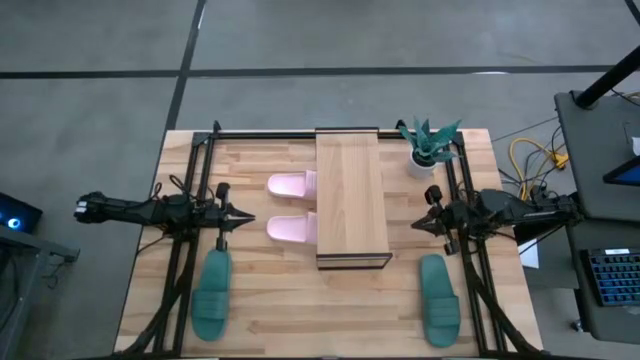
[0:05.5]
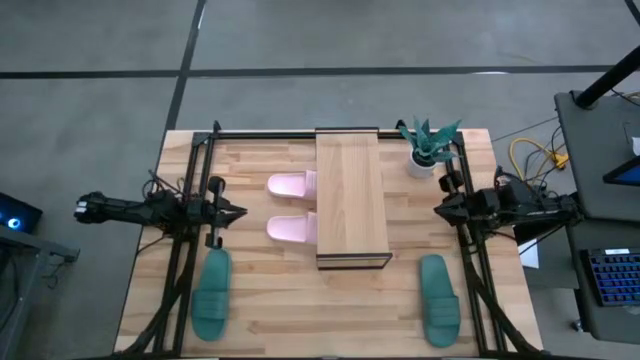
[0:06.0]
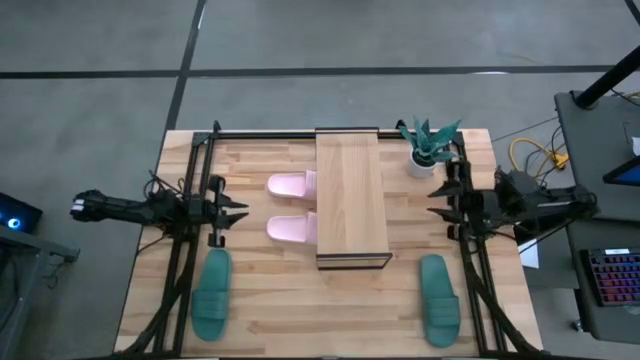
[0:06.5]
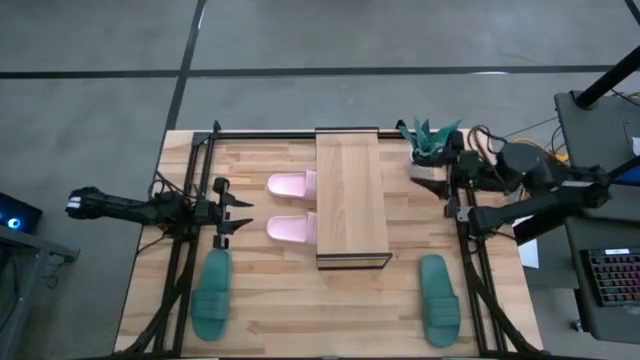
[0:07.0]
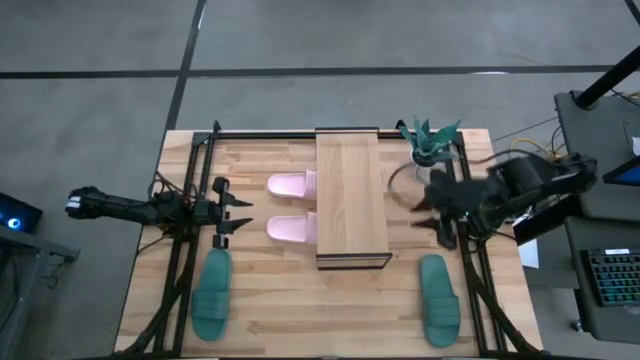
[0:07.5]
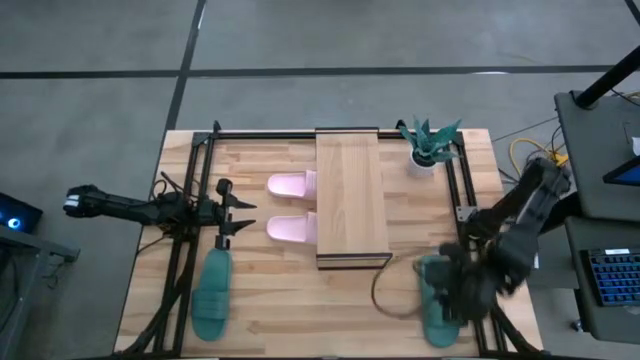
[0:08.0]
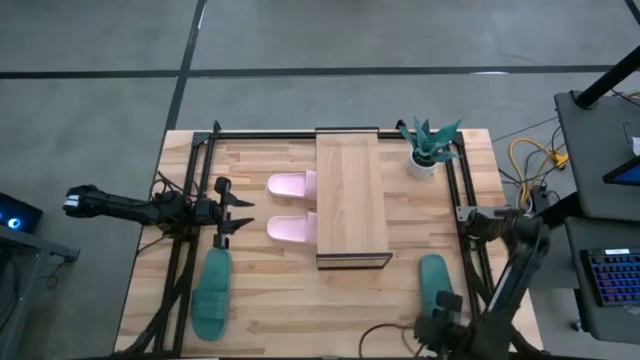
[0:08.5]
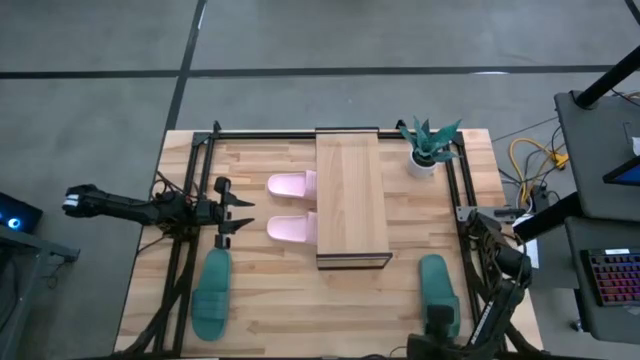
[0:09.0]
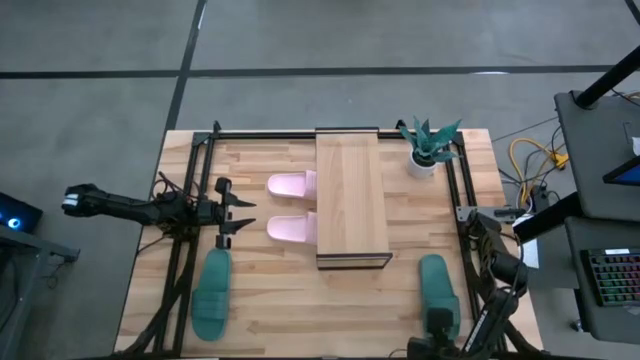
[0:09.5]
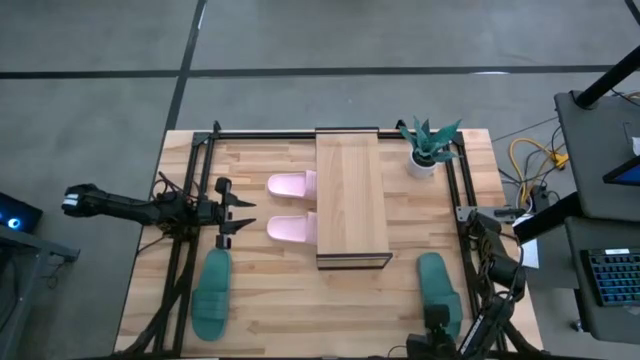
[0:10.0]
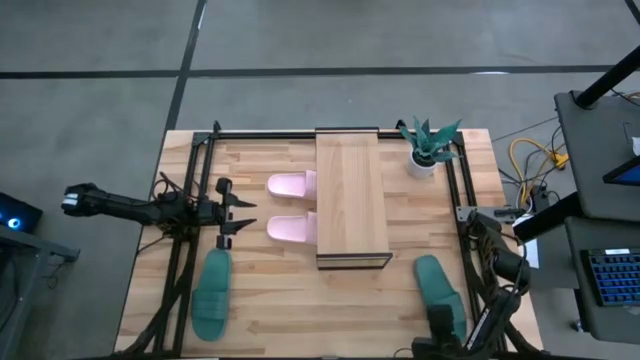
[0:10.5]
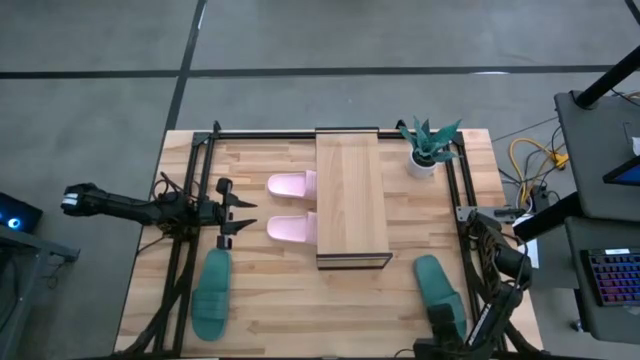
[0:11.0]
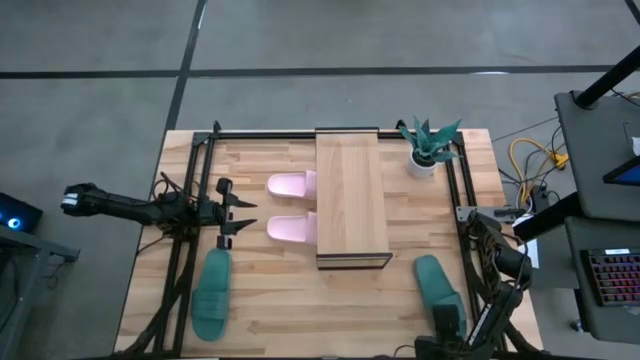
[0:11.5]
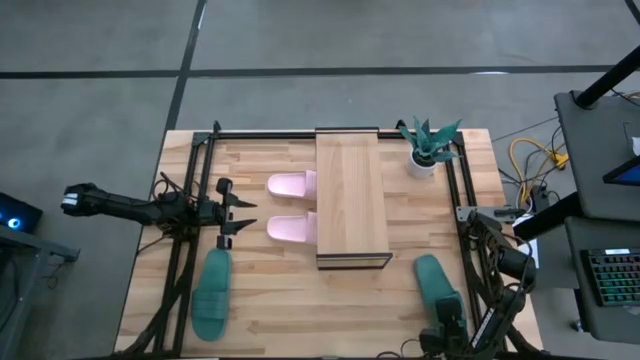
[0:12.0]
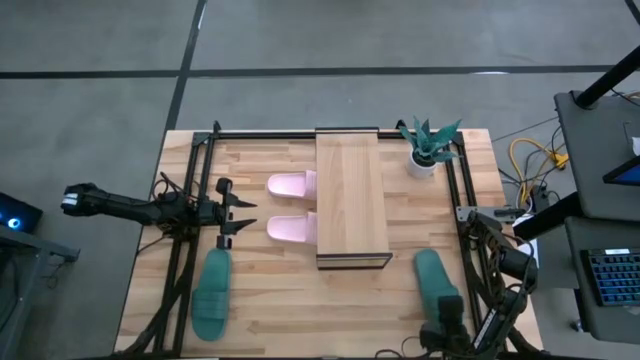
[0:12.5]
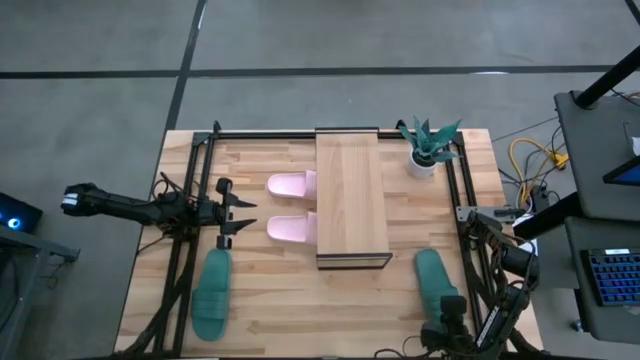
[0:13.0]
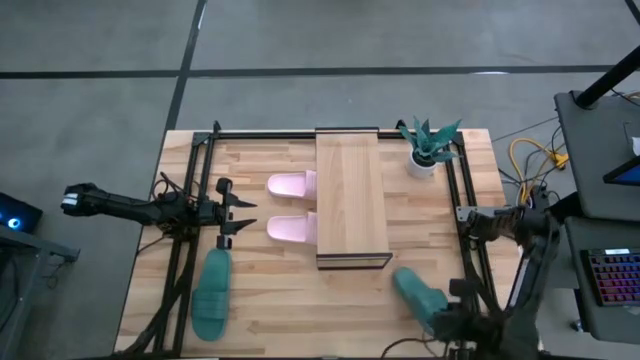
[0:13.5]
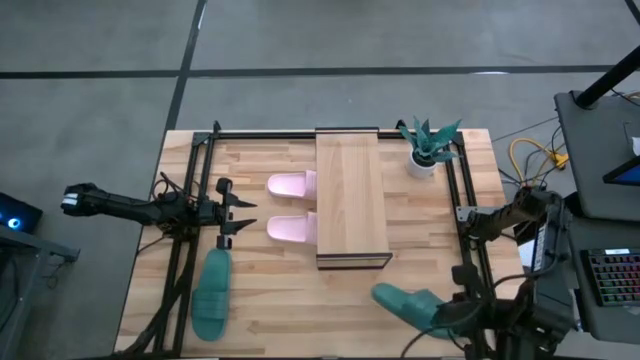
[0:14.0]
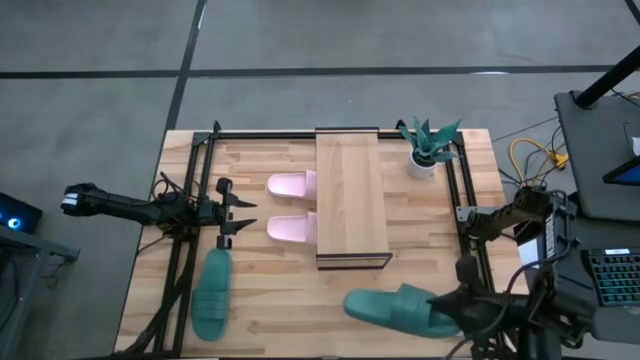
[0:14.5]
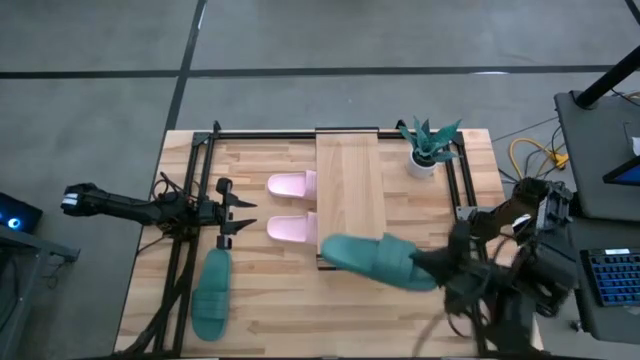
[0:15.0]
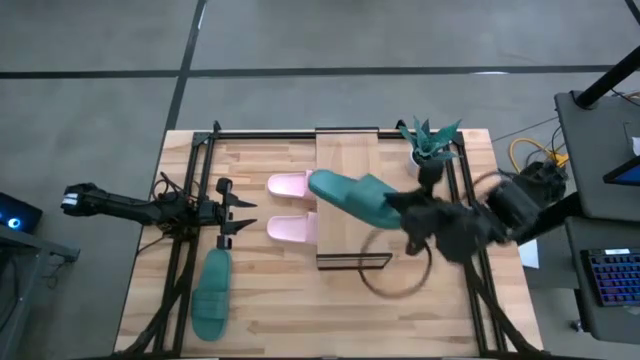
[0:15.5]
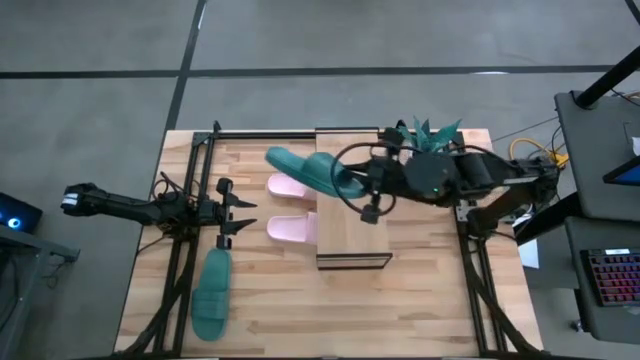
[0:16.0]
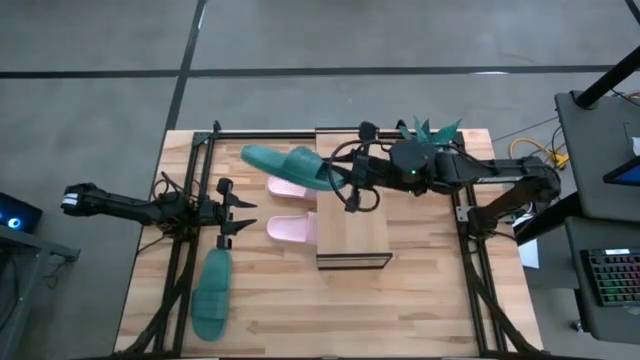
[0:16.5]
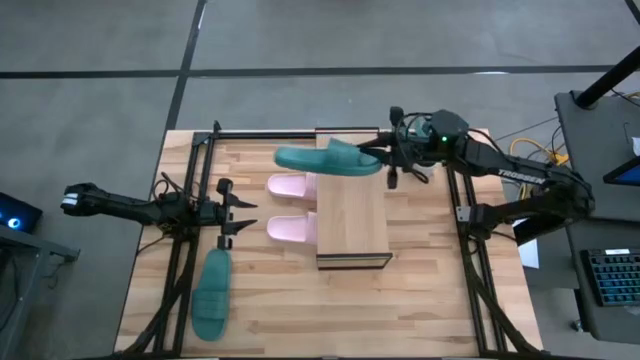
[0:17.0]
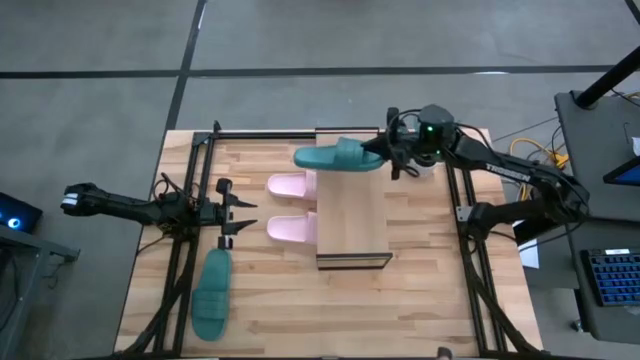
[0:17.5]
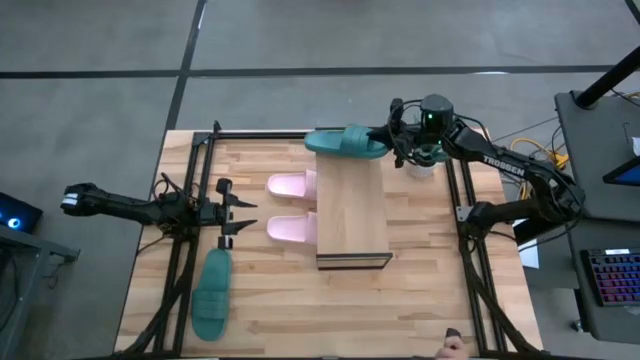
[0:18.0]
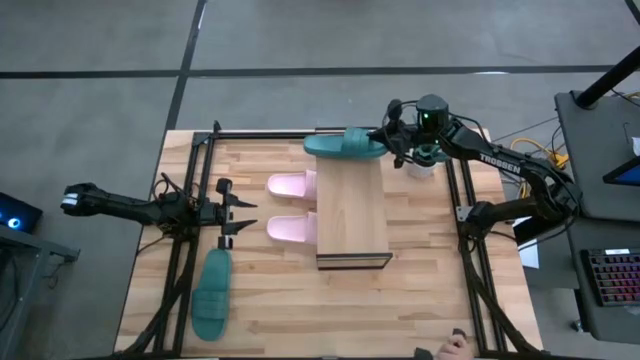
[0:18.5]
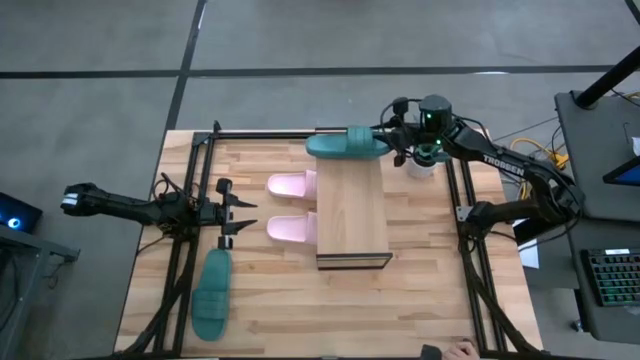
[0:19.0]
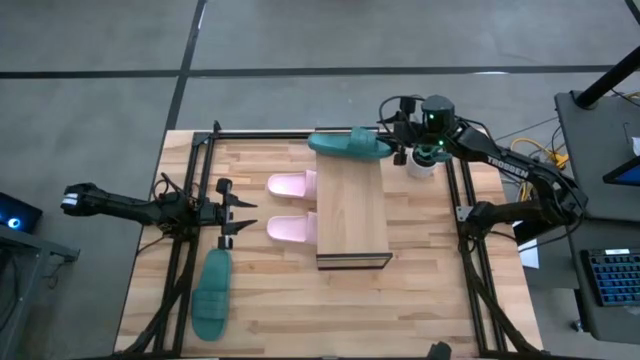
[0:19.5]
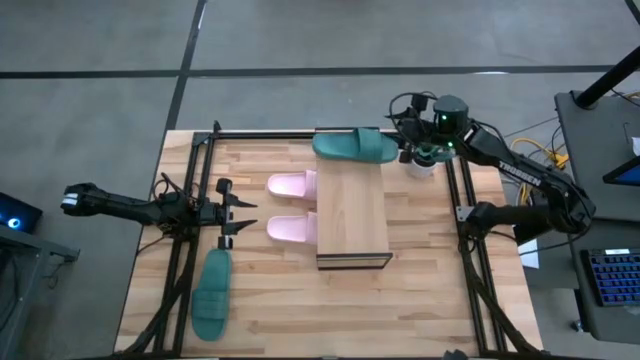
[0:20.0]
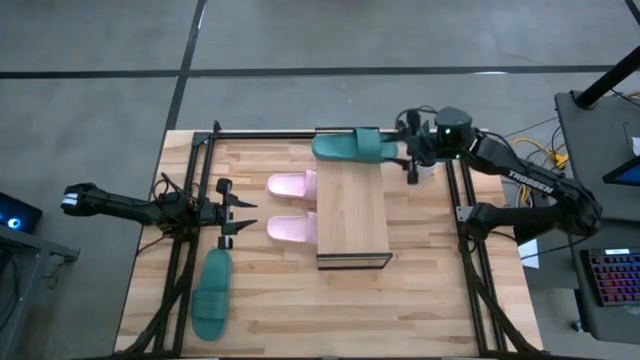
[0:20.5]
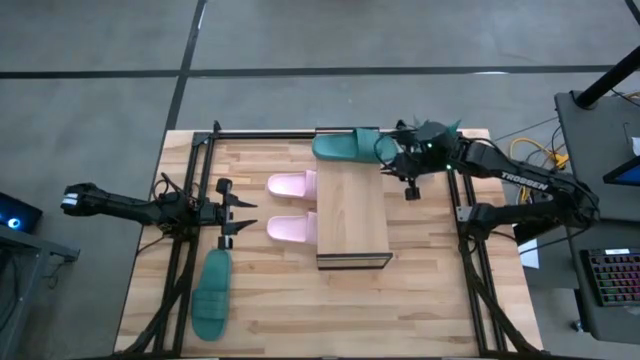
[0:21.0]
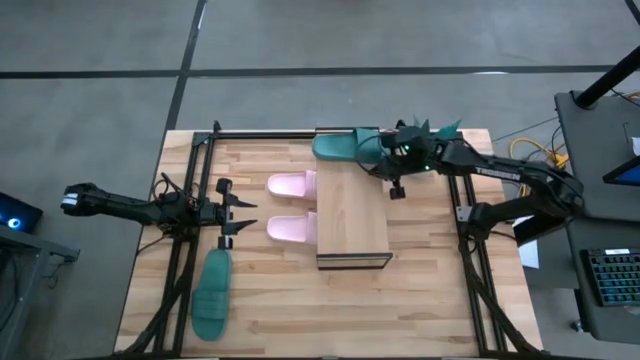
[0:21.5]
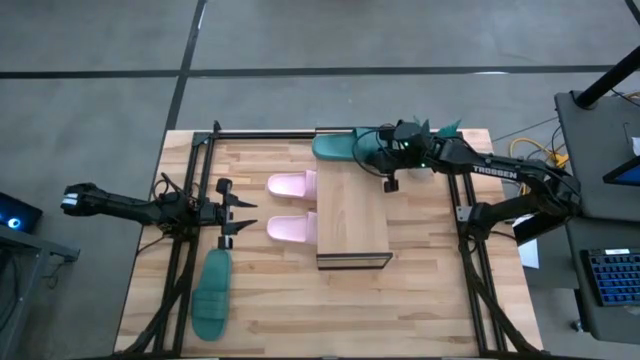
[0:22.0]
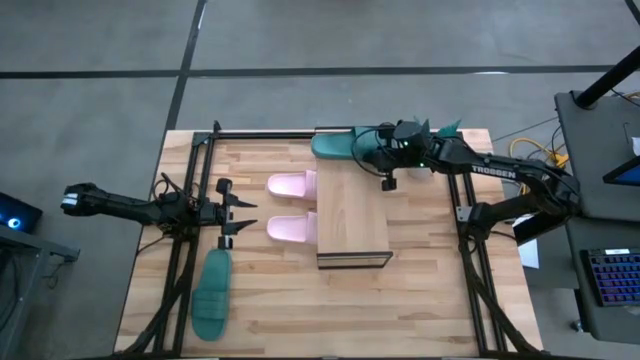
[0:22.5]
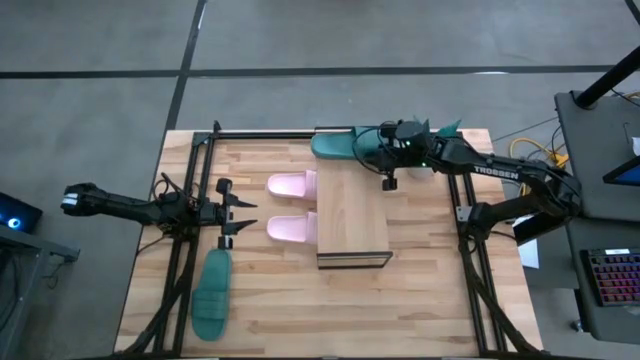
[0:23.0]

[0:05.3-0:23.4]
Task: Pick and place slides into the shelf
Put the right green slide on the shelf
